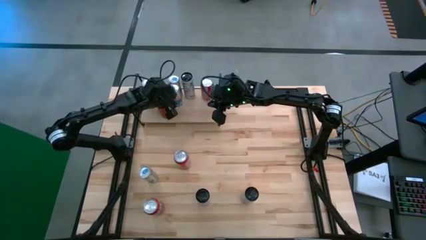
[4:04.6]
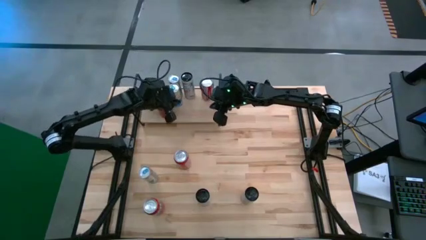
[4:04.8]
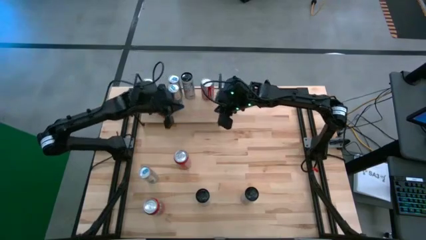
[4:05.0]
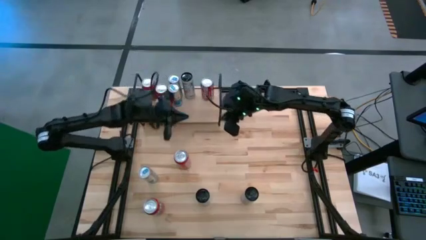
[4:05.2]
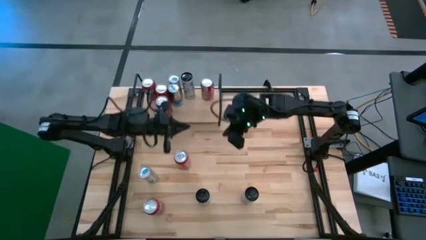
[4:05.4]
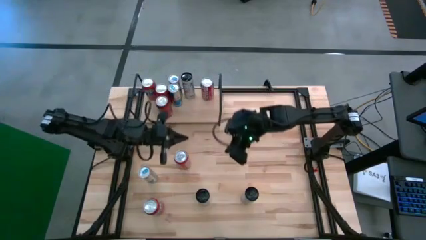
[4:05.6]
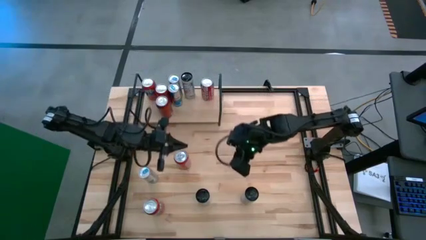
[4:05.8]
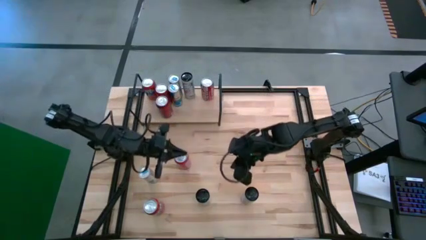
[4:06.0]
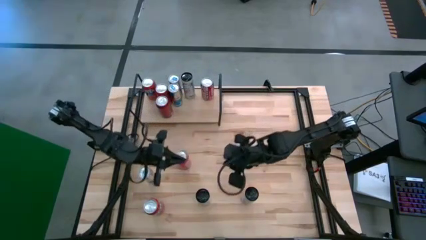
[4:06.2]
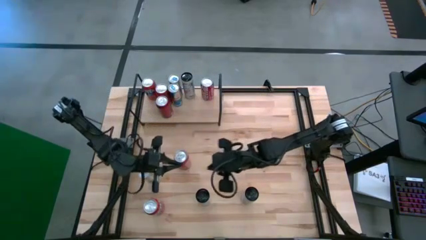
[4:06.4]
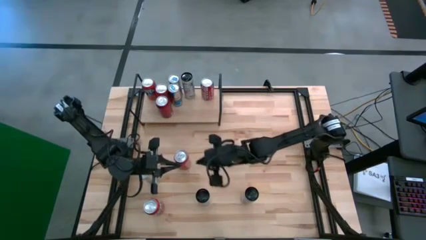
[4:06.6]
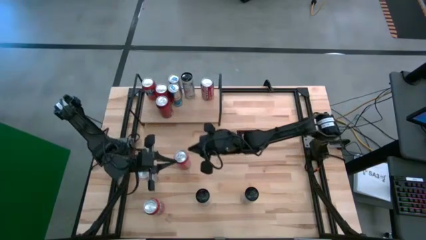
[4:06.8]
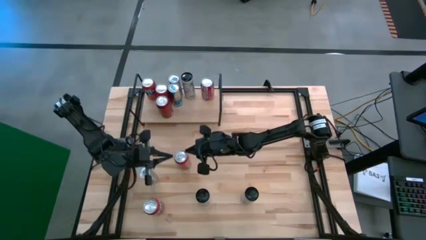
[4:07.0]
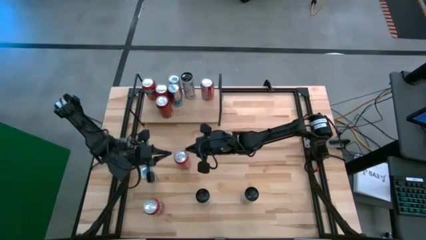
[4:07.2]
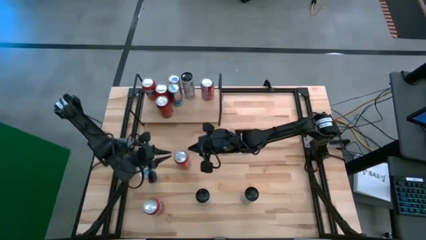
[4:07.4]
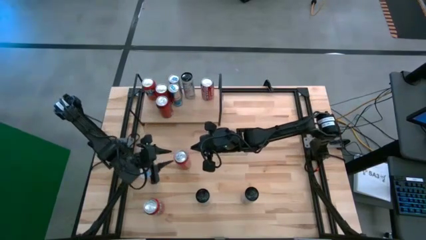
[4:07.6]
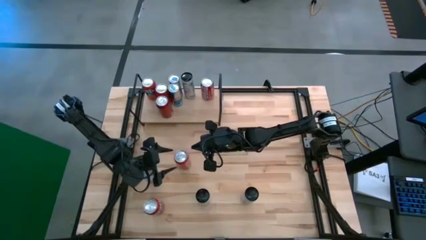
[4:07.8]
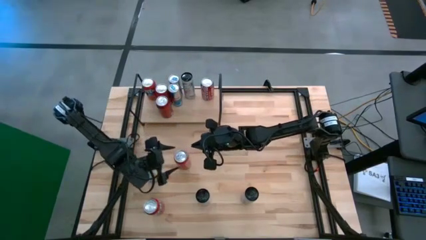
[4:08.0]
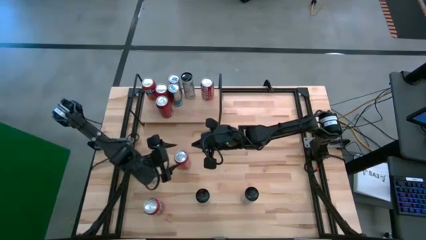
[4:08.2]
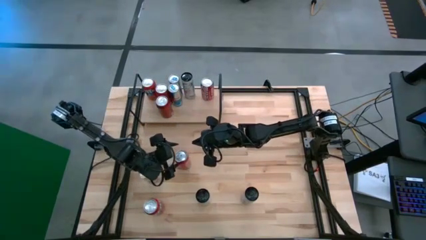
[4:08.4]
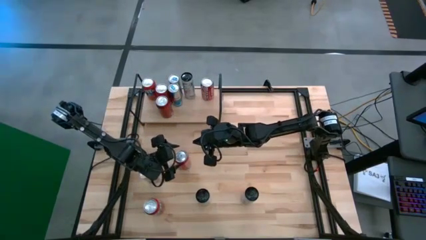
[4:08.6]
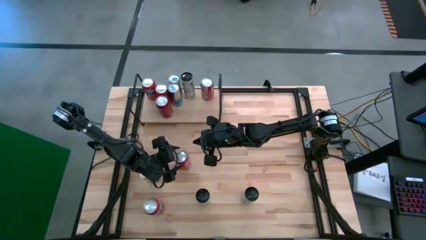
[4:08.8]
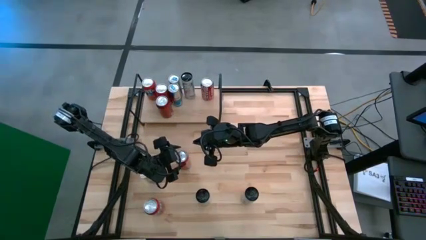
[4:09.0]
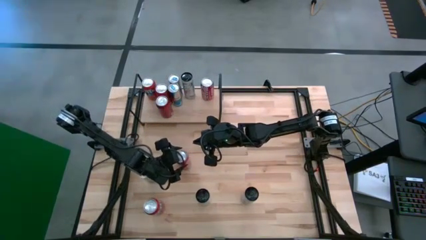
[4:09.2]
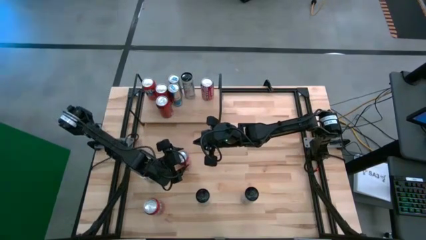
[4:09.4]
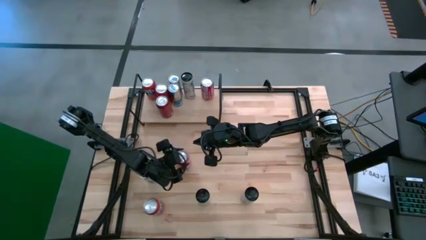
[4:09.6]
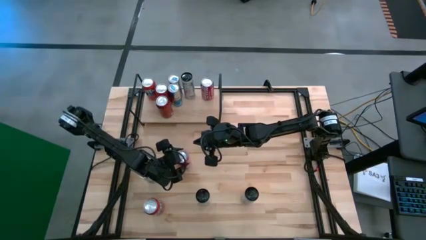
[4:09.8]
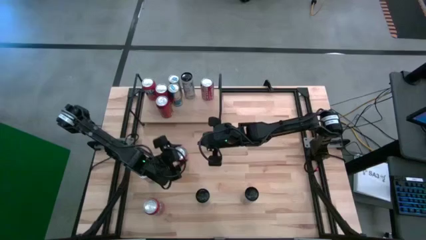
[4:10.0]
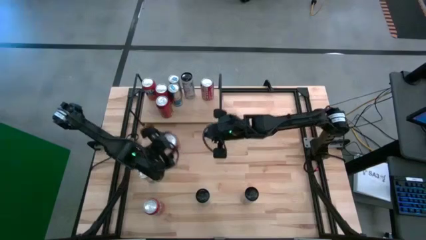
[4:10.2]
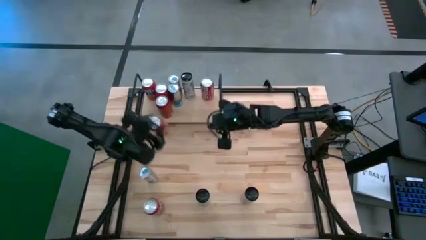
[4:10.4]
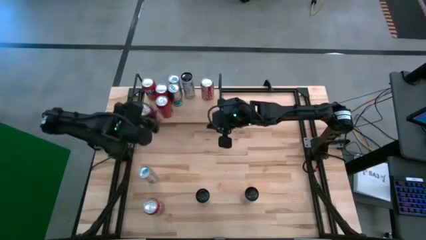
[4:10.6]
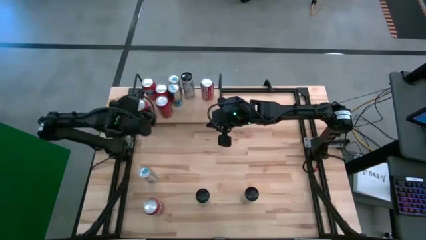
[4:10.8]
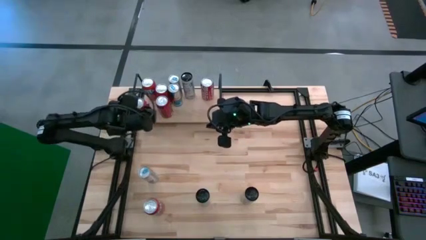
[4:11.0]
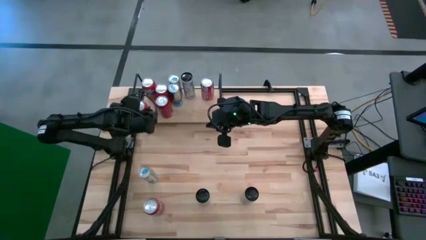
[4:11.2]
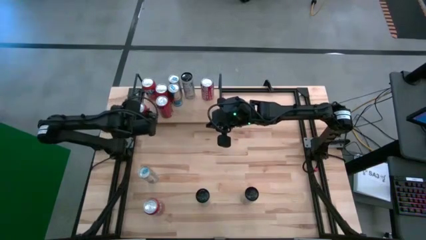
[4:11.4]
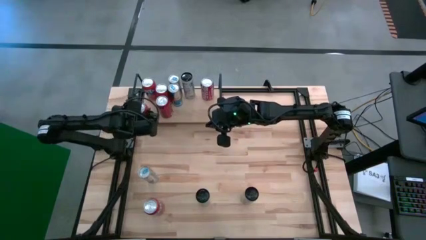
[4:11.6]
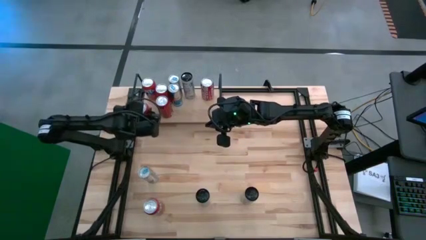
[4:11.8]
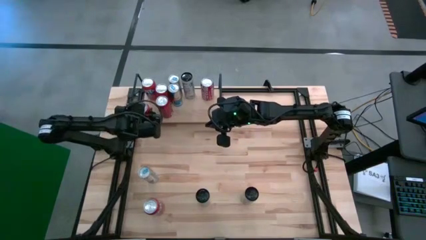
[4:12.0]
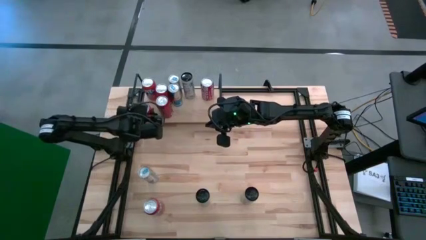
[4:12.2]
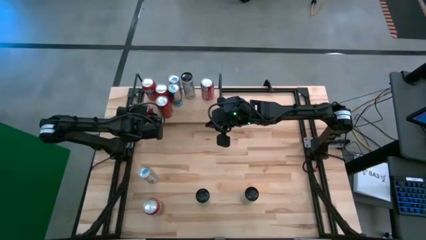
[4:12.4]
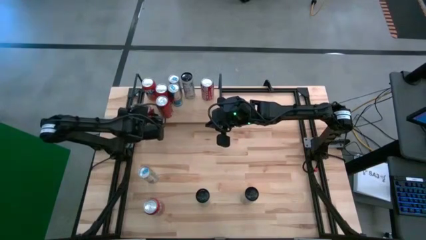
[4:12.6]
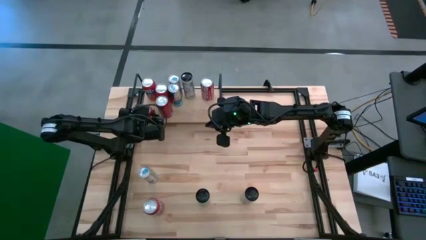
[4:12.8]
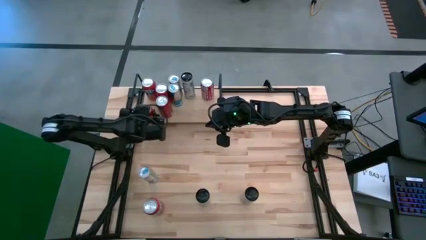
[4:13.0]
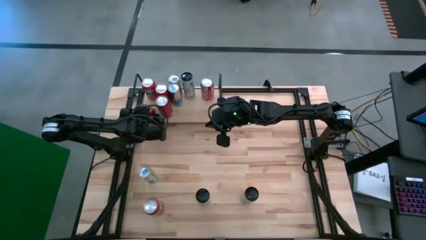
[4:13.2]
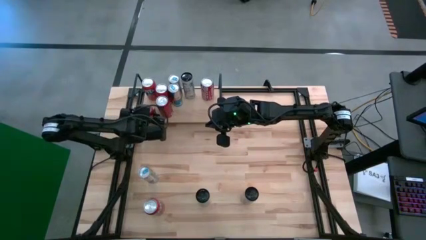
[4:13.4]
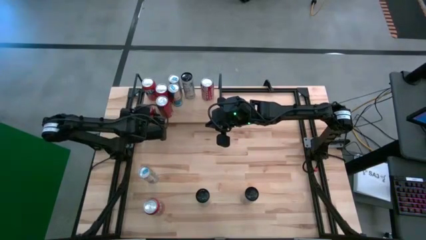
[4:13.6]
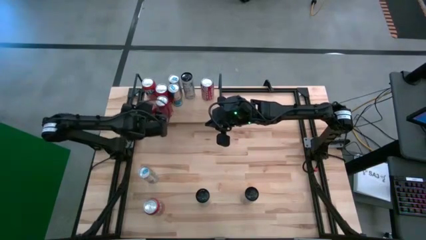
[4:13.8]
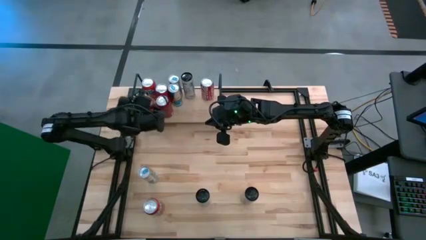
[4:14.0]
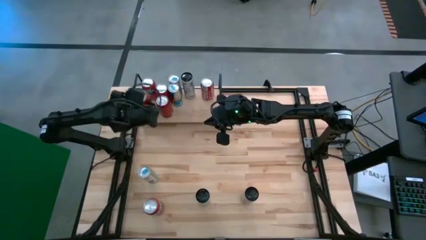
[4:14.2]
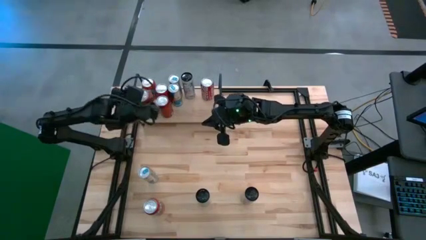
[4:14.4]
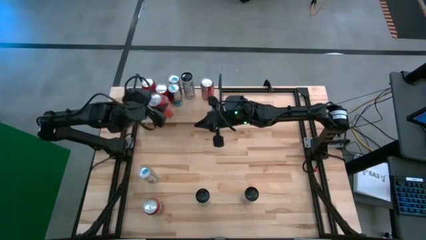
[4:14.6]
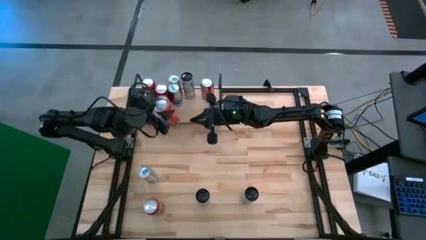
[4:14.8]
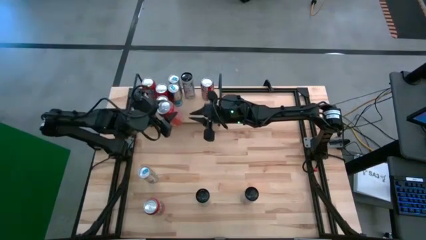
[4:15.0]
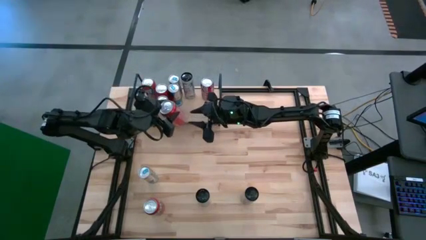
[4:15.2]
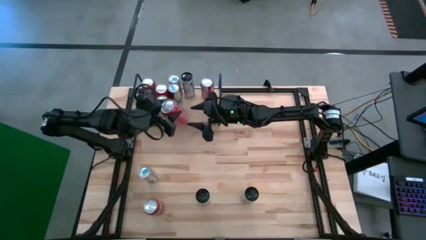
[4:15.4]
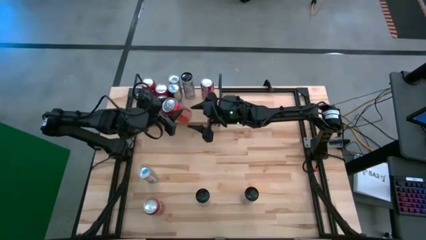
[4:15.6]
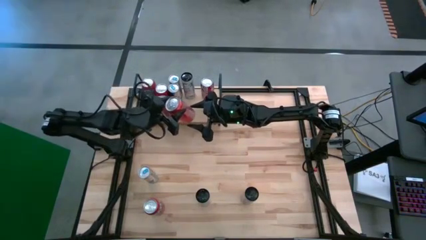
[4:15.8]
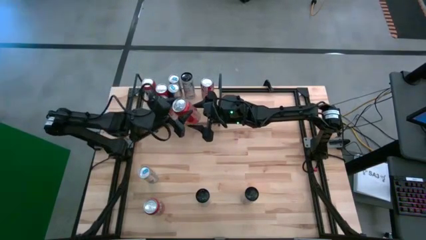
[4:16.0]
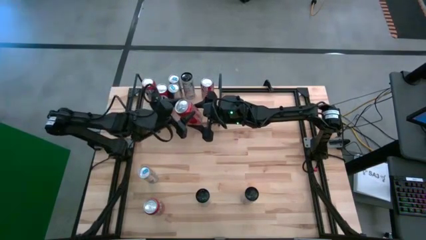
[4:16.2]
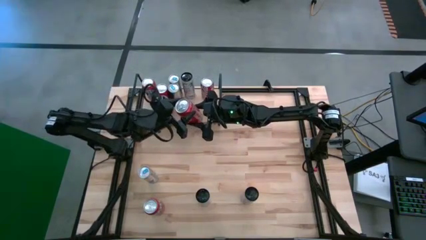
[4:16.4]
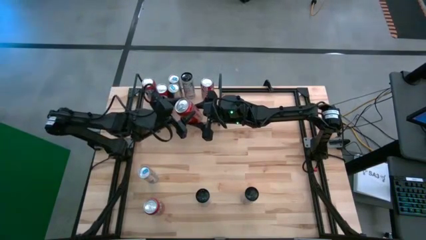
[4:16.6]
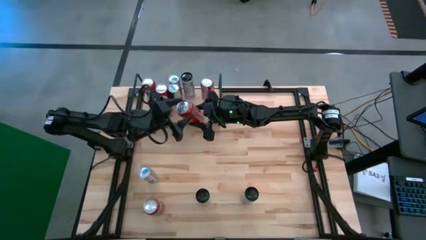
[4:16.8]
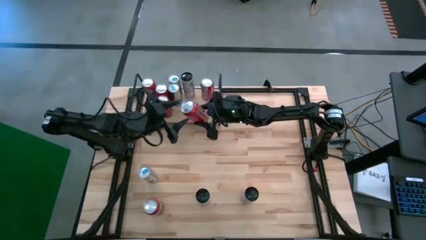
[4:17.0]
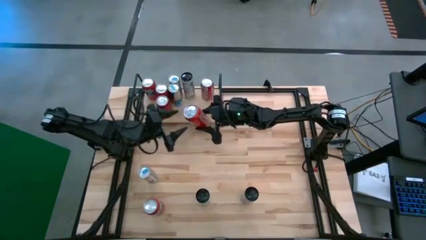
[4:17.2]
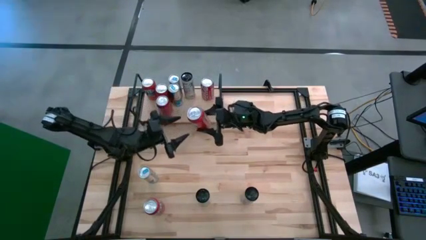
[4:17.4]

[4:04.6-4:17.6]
Task: Place canned beverage on shelf
Put the top orange soda can on the shelf aligned with the other orange soda can
